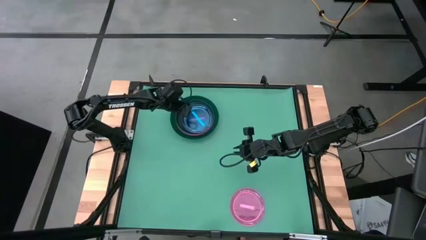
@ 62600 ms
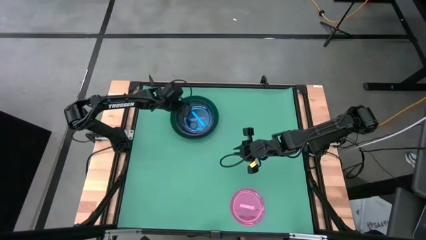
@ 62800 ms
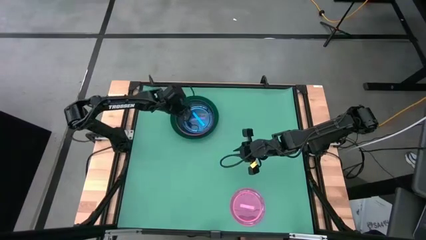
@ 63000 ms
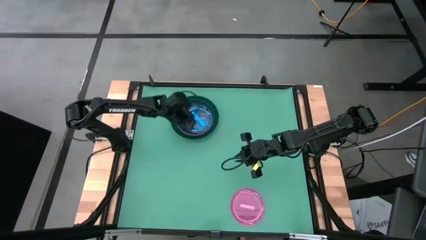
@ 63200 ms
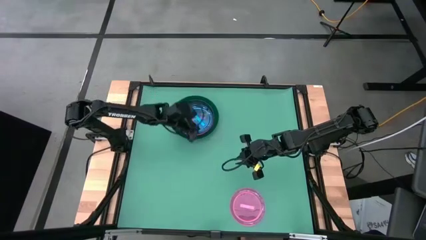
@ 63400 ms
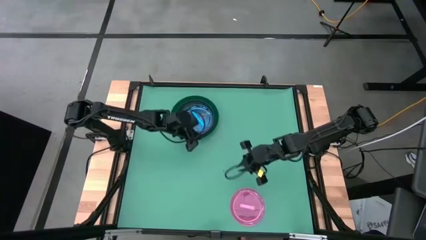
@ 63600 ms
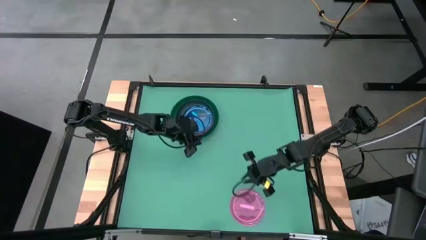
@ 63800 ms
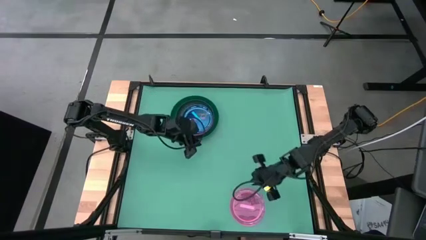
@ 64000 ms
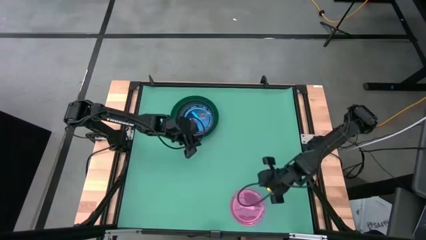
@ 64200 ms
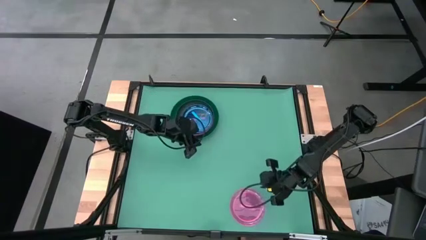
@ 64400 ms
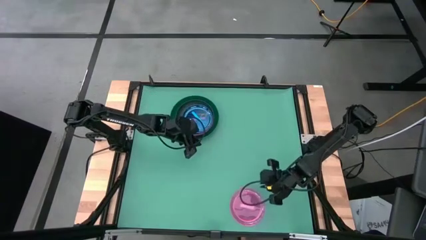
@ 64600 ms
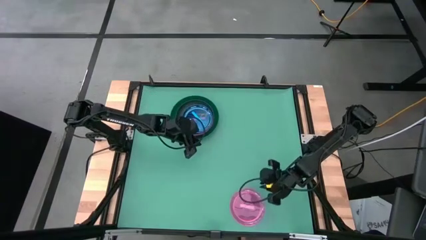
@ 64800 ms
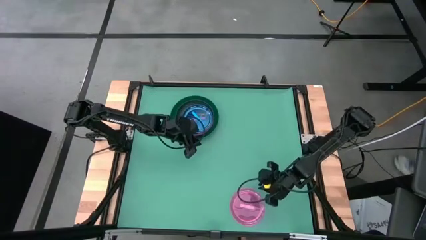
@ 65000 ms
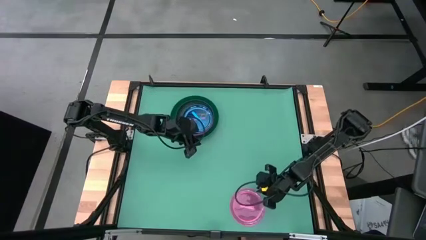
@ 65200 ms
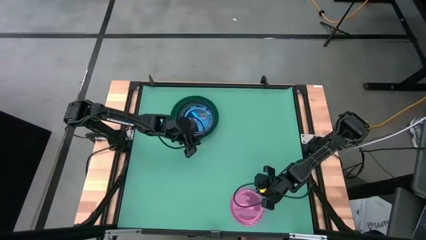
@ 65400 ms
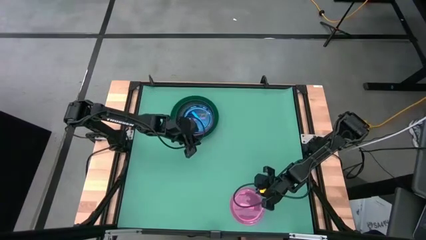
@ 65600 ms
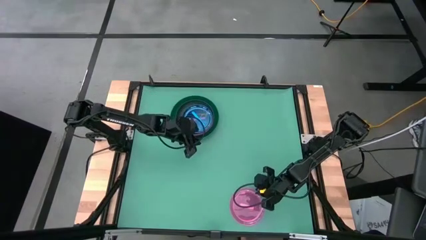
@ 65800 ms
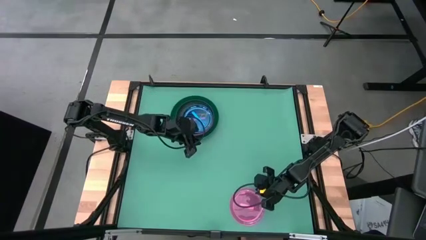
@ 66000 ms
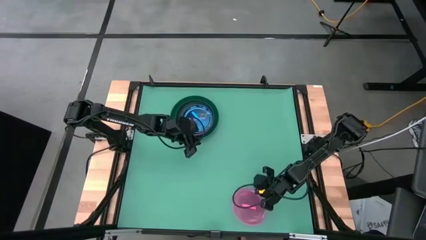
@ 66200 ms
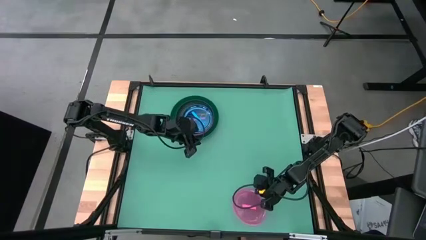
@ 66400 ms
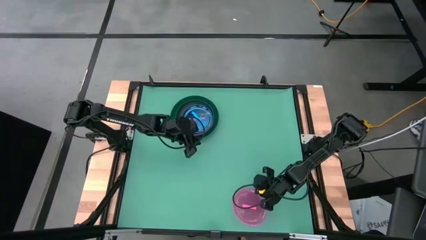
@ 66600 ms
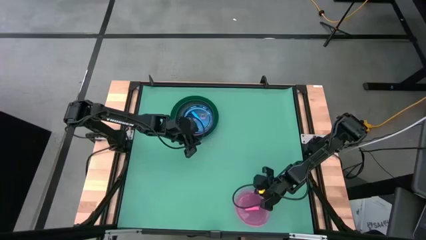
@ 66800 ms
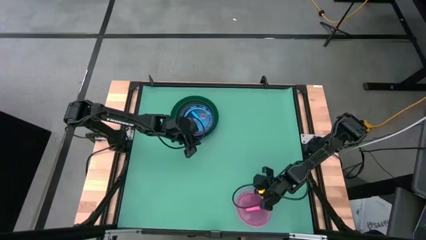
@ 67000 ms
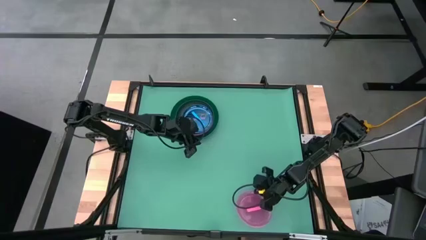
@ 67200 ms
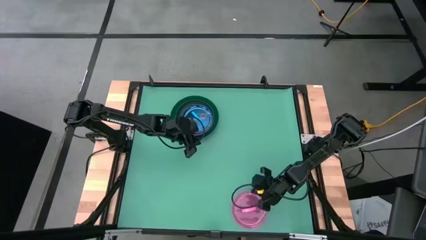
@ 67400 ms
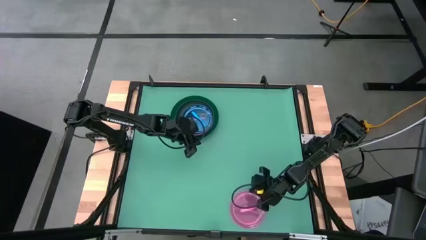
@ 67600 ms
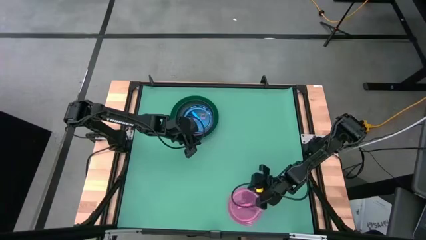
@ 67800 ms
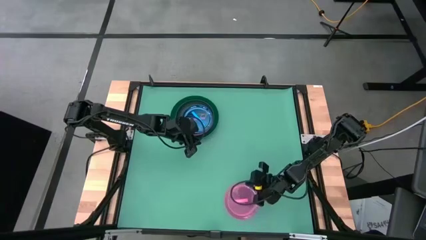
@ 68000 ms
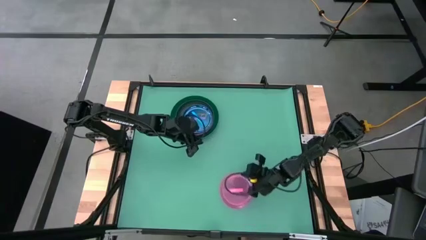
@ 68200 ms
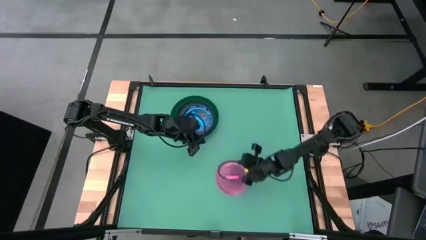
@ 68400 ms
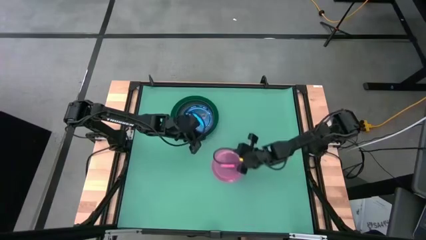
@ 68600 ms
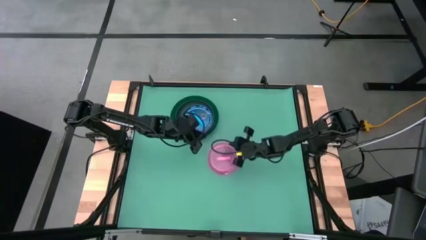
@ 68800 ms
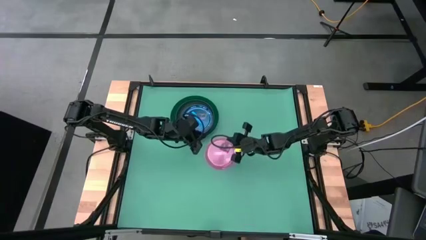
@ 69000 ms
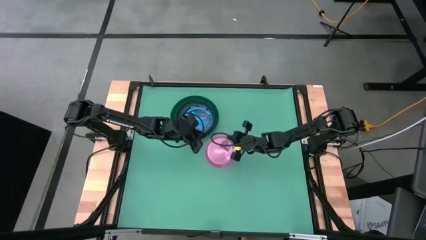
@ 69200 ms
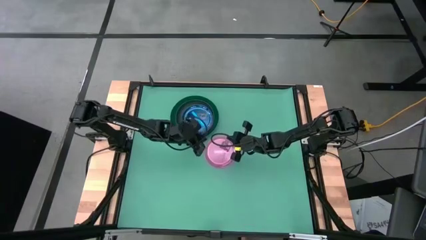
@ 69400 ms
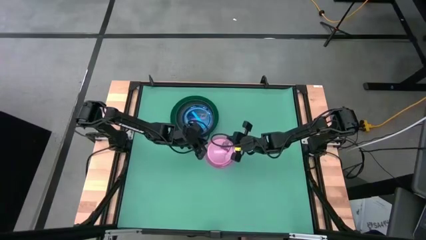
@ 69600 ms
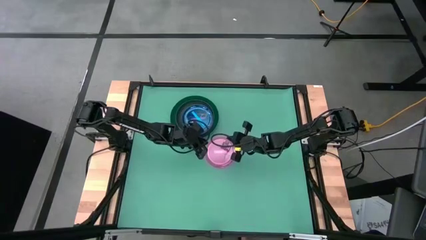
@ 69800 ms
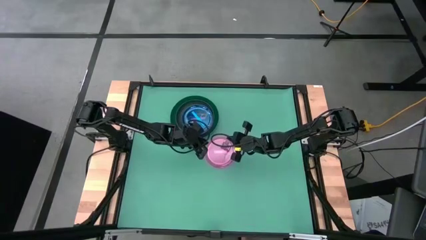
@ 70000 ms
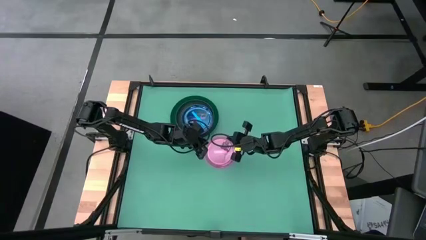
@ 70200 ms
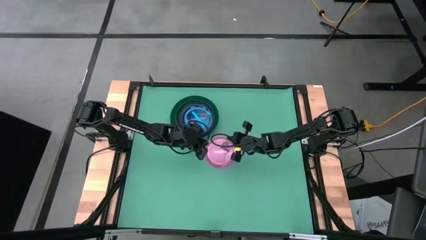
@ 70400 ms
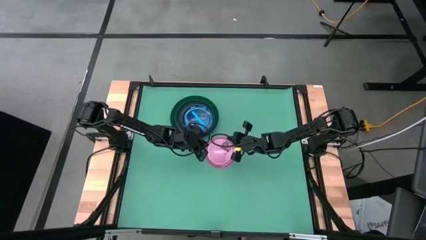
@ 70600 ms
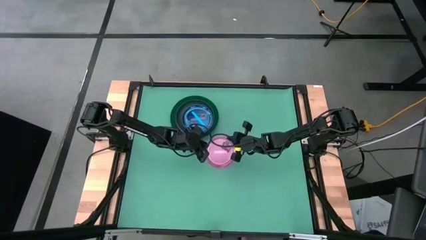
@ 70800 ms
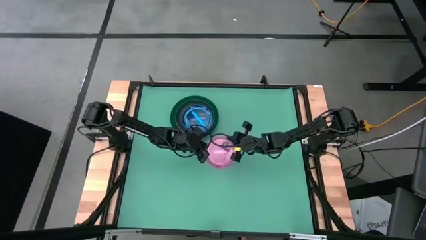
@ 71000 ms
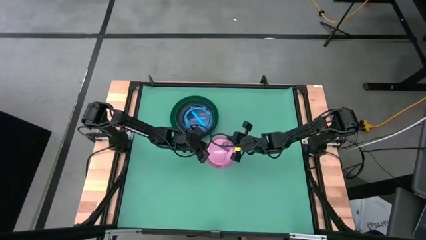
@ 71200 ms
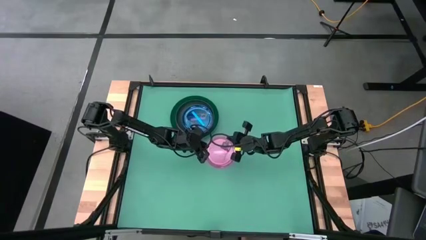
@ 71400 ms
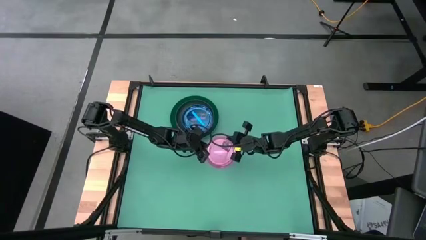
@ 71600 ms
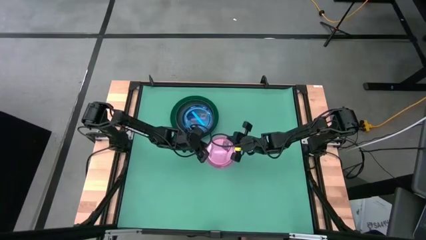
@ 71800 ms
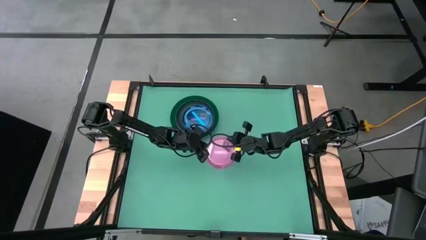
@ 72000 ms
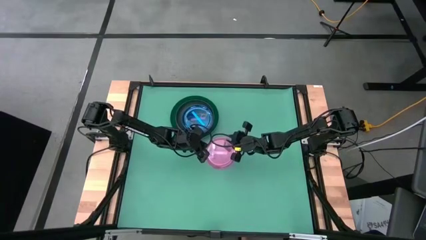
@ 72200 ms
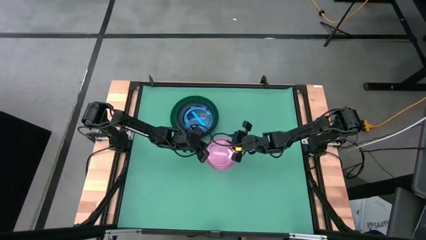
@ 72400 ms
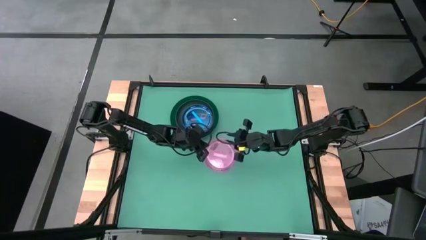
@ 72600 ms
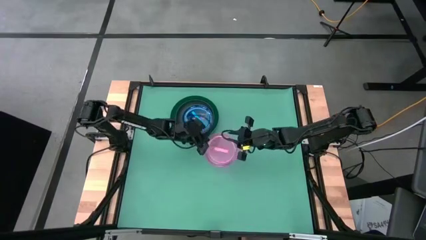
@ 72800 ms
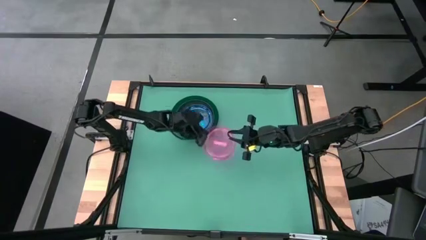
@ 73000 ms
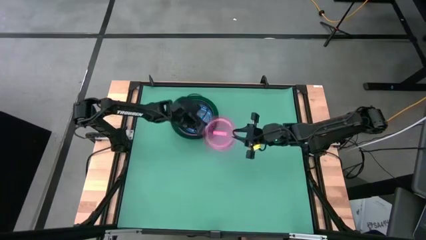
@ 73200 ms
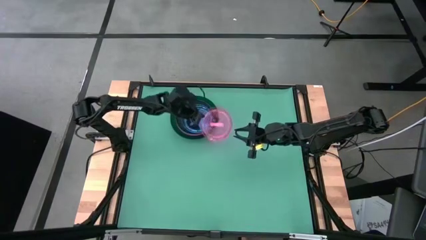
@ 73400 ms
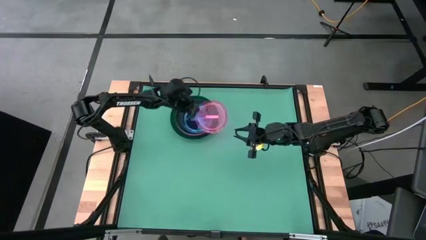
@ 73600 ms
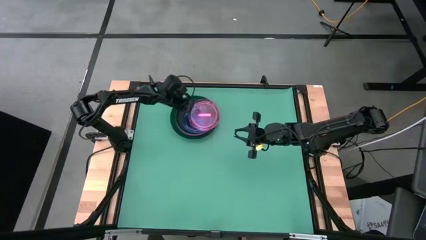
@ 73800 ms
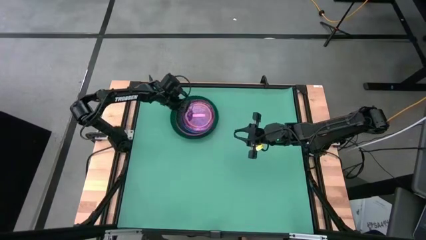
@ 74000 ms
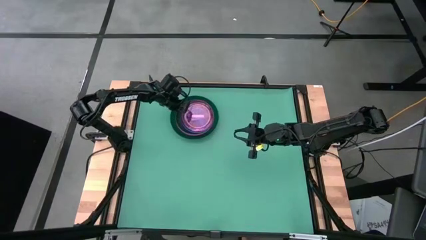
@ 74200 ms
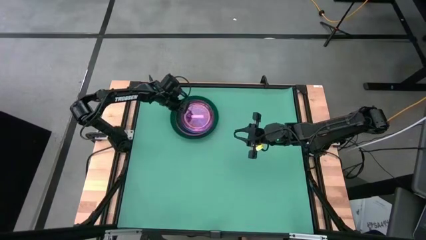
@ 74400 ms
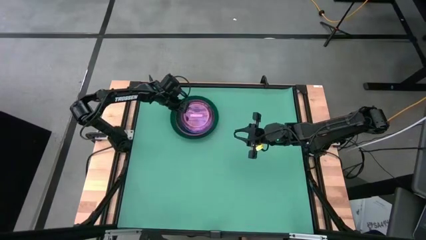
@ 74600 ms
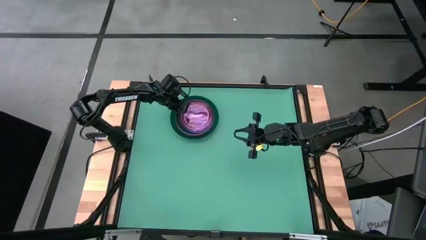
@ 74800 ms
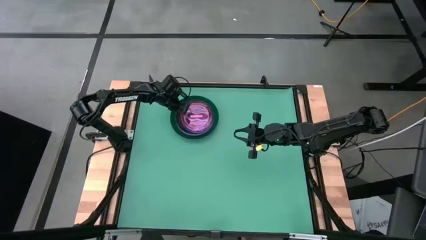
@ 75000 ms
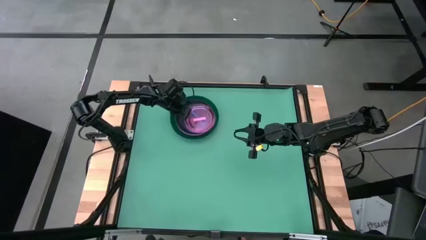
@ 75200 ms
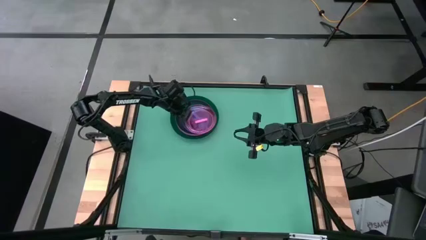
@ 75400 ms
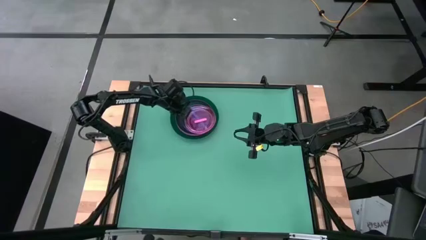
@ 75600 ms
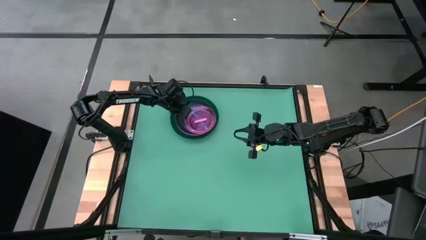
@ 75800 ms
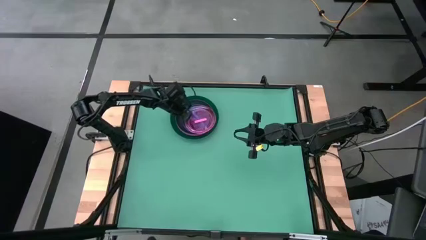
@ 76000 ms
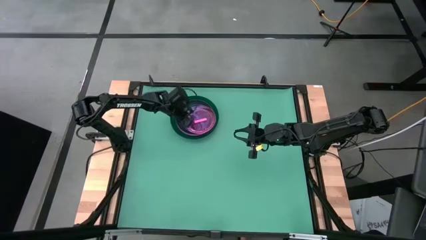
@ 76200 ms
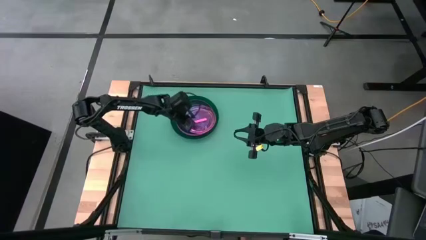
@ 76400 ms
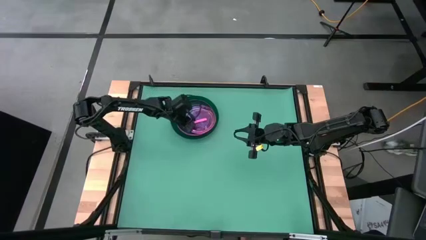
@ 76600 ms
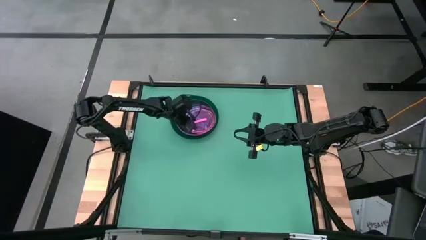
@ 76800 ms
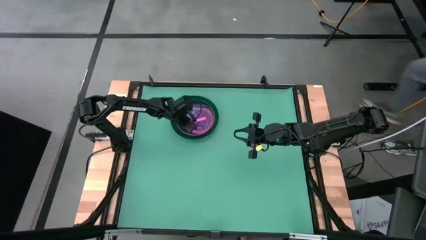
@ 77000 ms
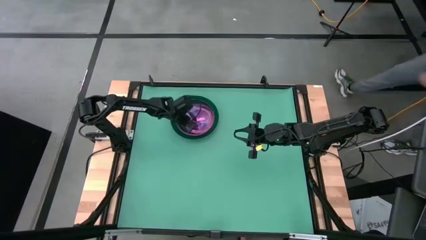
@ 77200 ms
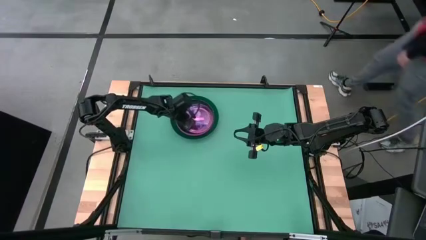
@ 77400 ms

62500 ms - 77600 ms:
Task: Stack plastic plates
Stack the light pink plate on top of the blue plate
